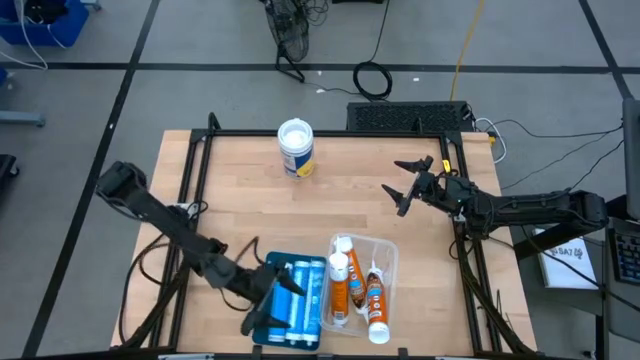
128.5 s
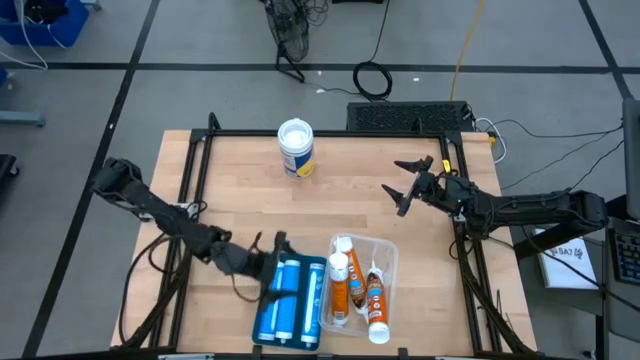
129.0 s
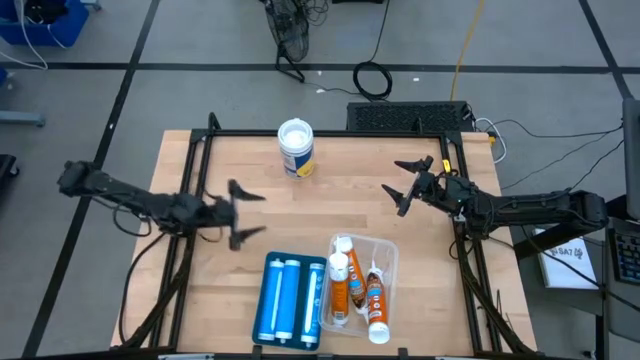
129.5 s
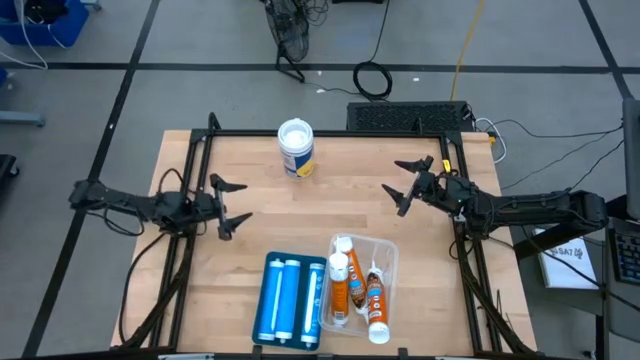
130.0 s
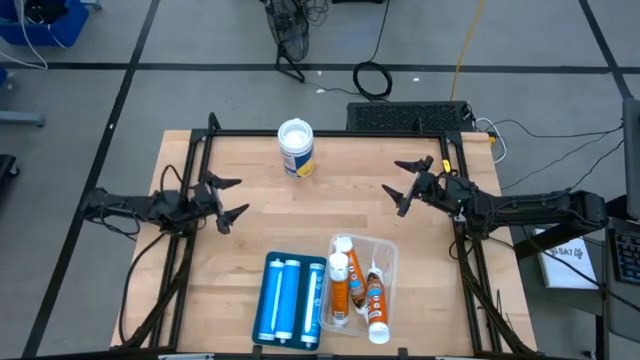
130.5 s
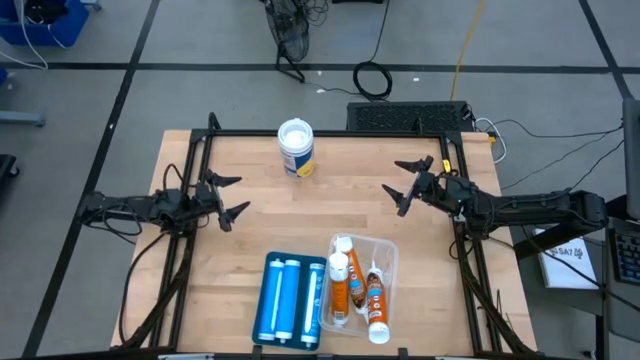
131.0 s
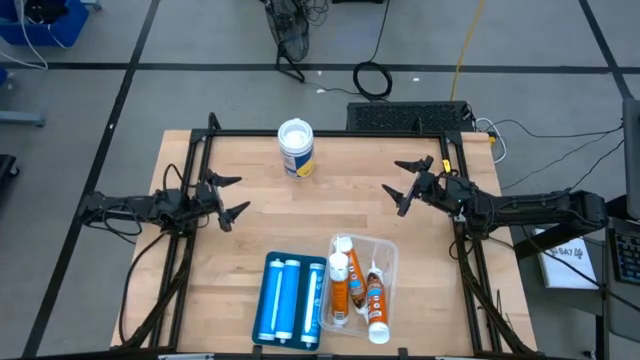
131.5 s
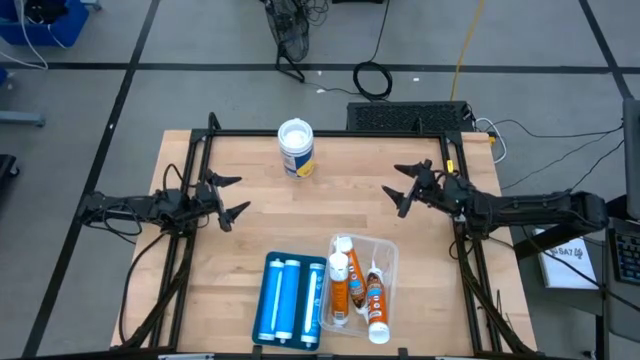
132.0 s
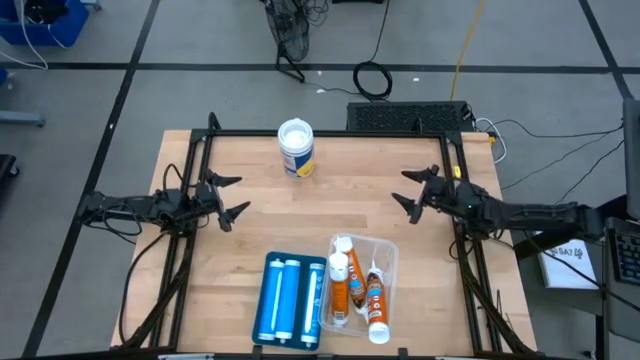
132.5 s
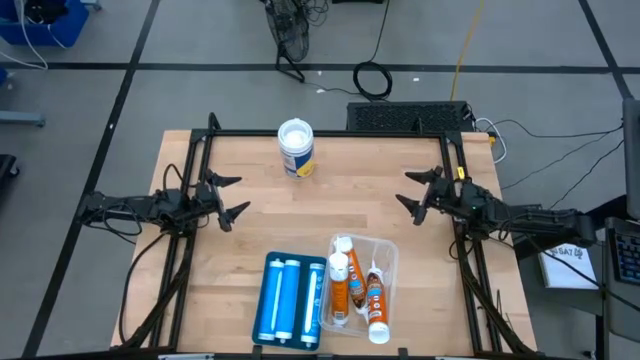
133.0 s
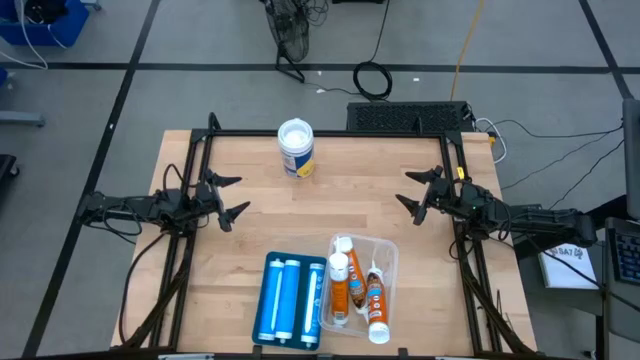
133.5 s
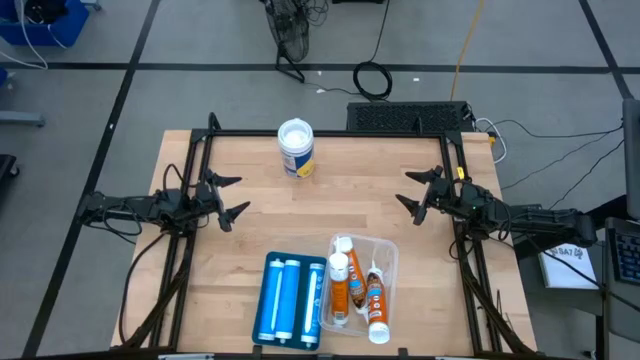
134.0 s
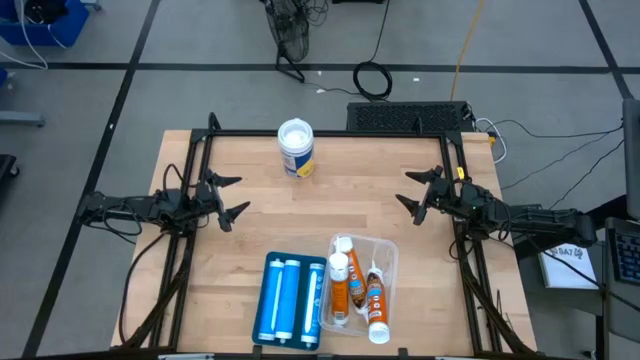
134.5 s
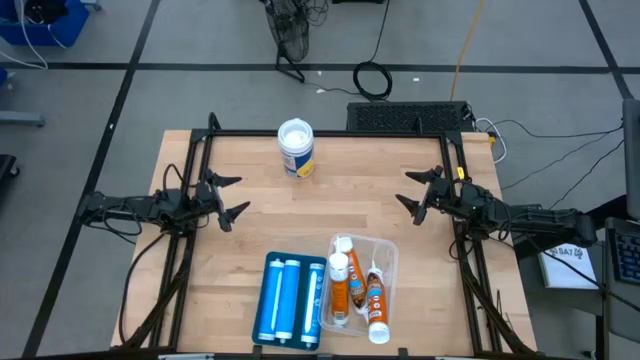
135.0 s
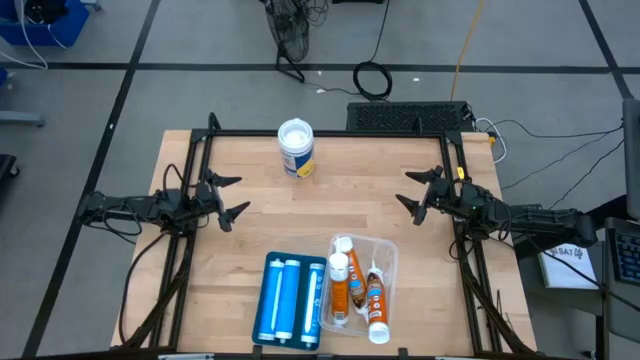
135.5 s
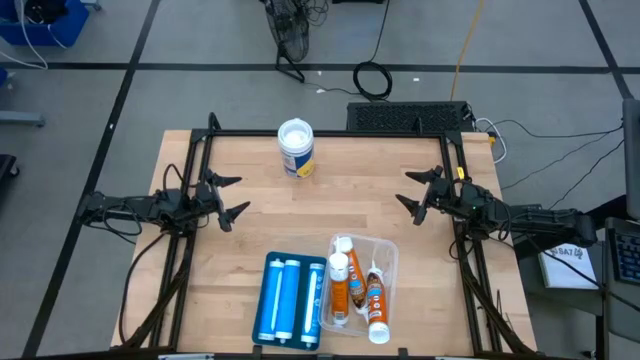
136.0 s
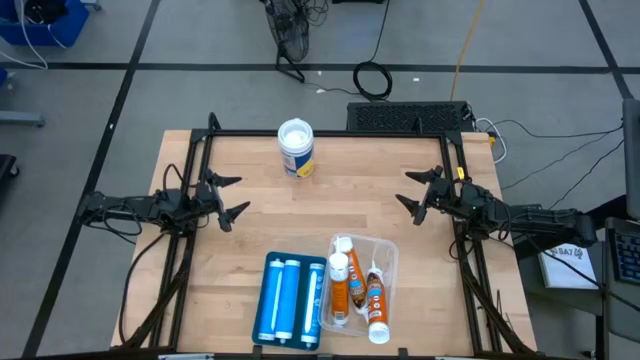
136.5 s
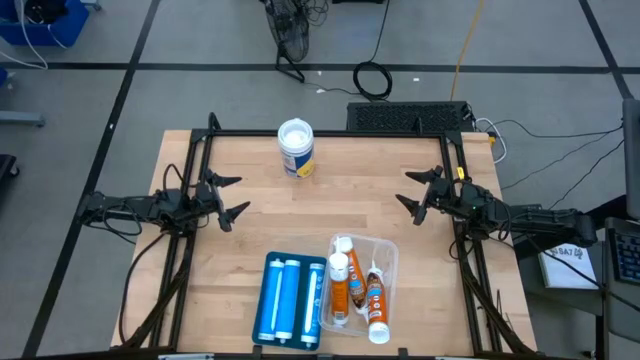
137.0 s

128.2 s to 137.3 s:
Task: Pick & place silicon tubes, Sealant and Lysol wipes
Return to Home Position

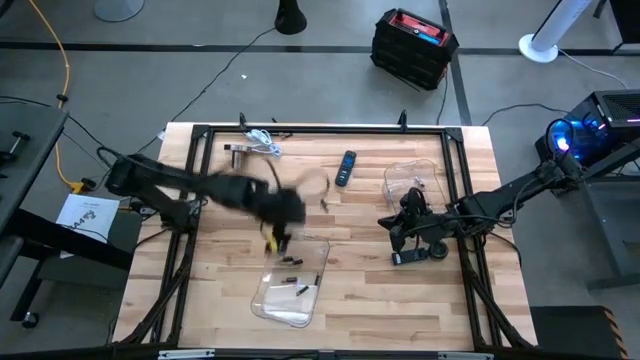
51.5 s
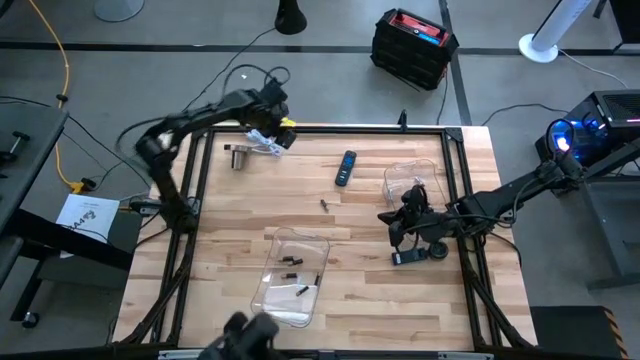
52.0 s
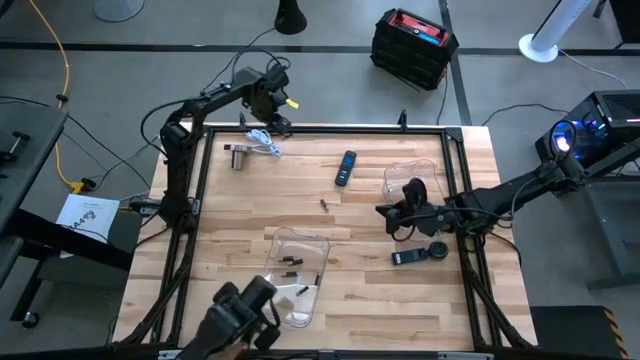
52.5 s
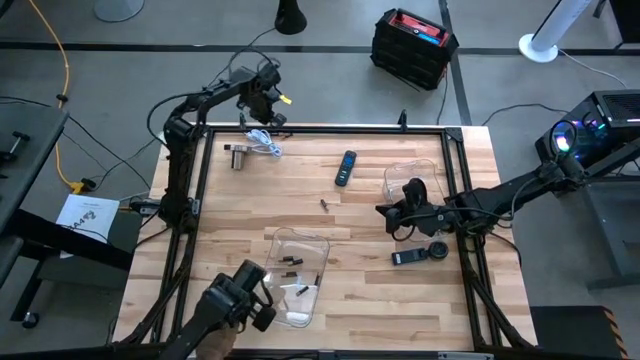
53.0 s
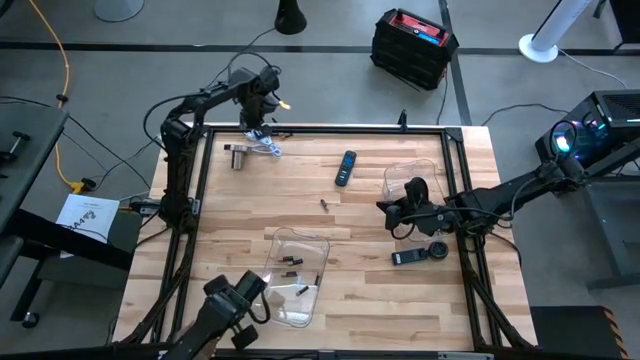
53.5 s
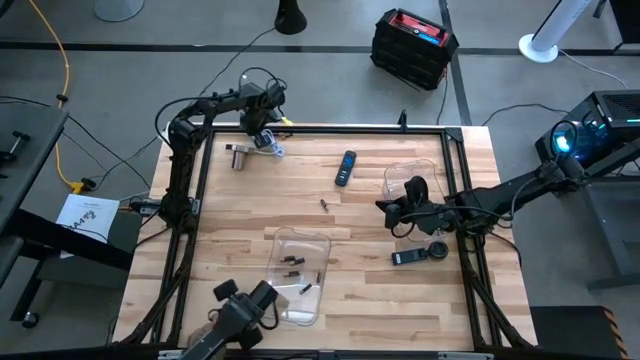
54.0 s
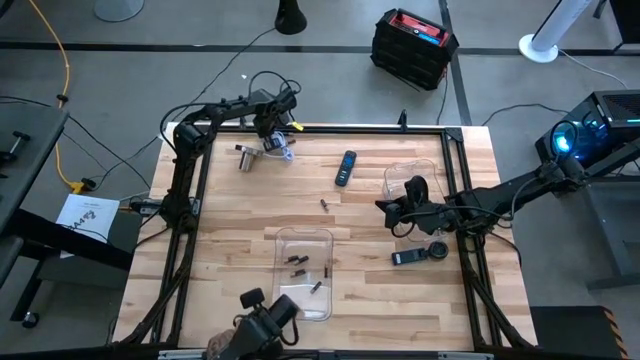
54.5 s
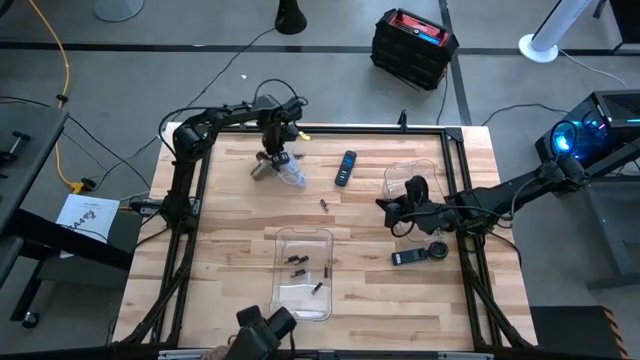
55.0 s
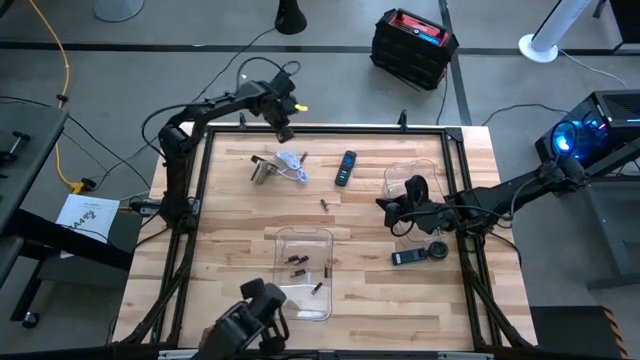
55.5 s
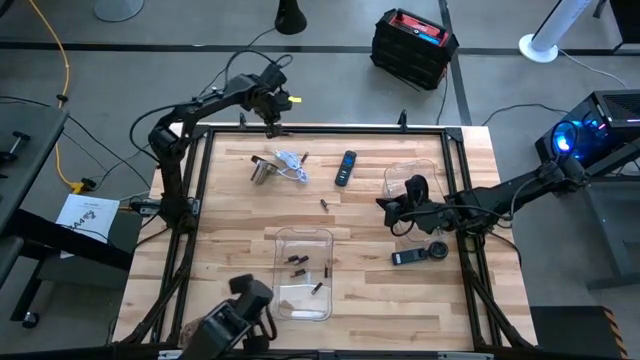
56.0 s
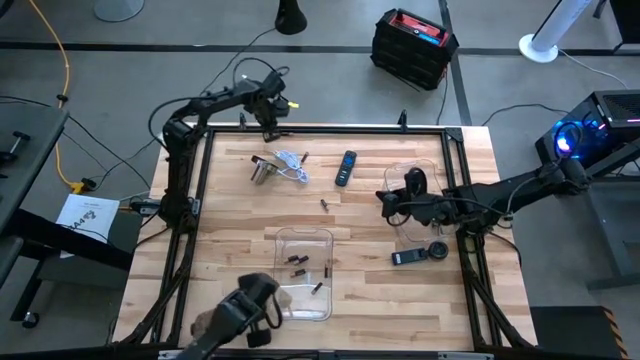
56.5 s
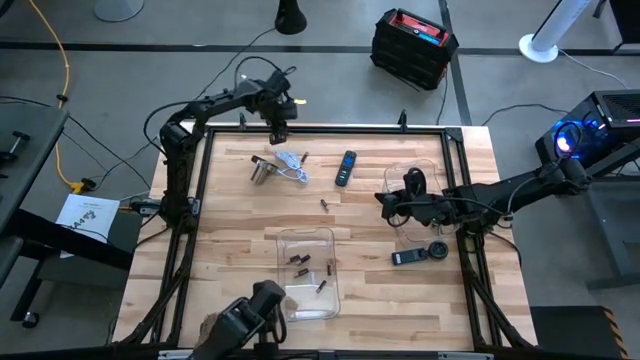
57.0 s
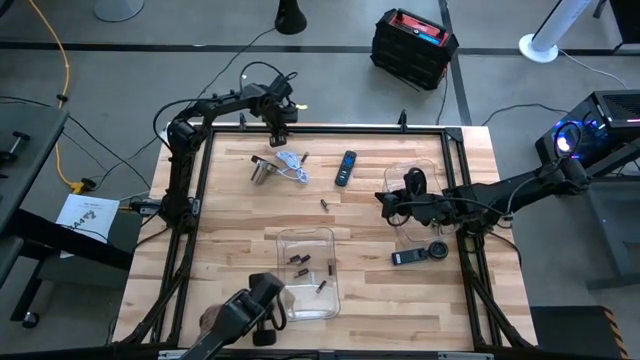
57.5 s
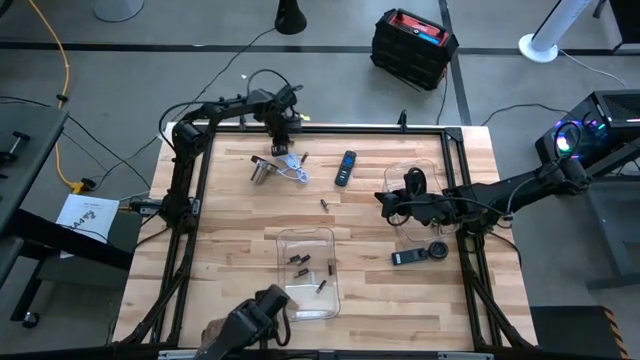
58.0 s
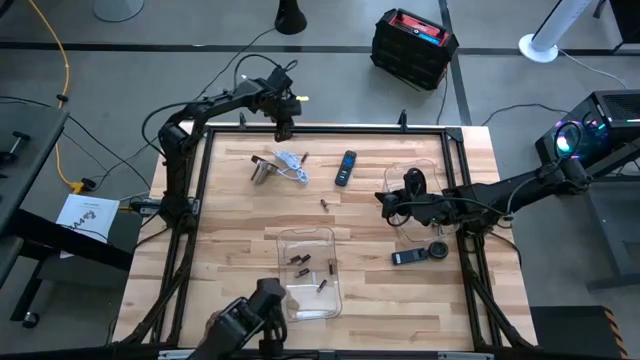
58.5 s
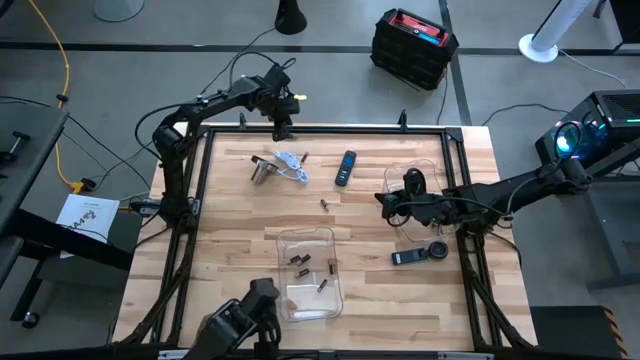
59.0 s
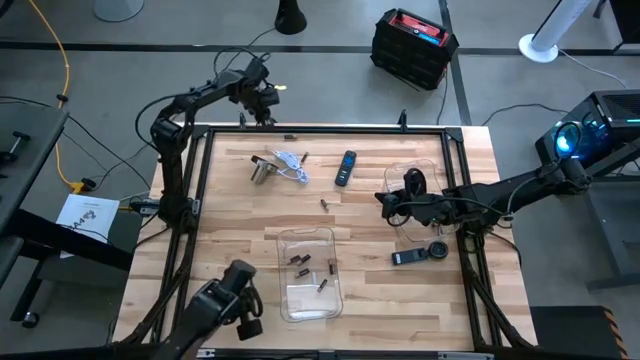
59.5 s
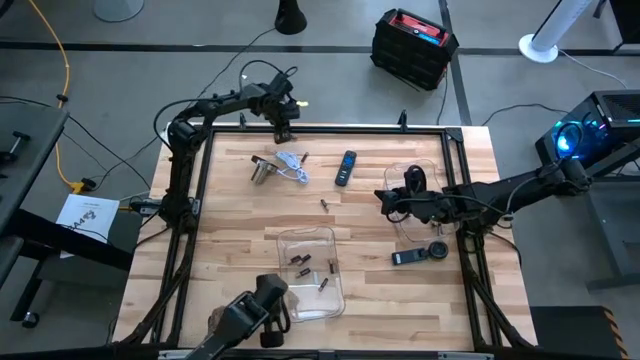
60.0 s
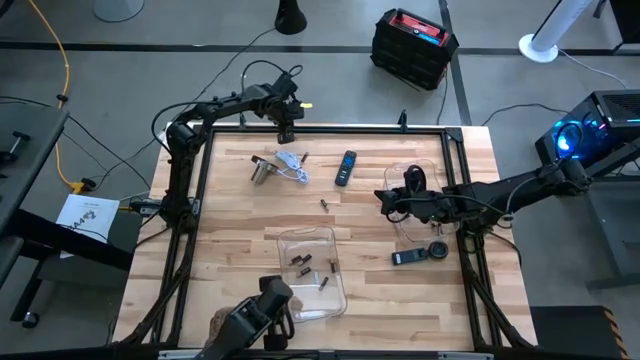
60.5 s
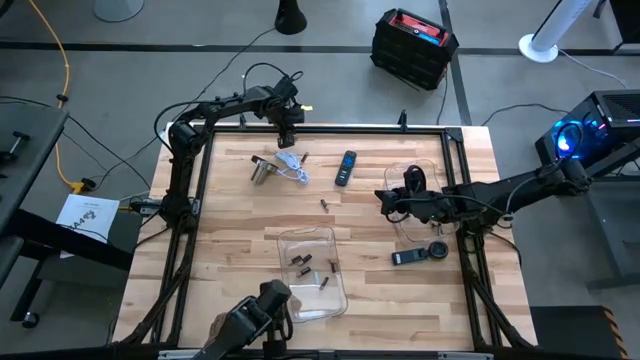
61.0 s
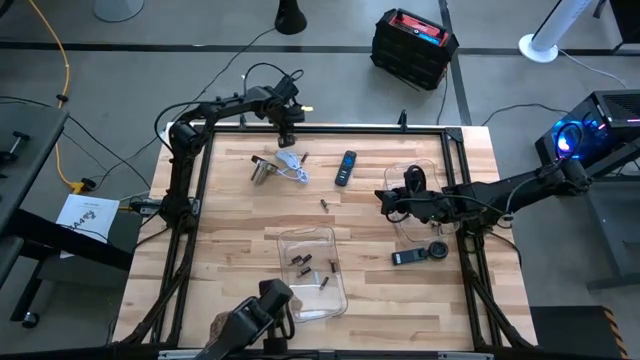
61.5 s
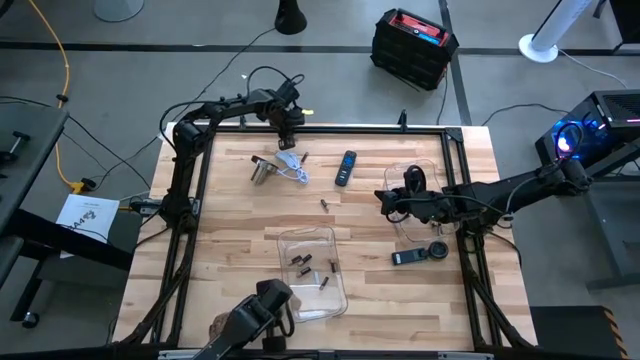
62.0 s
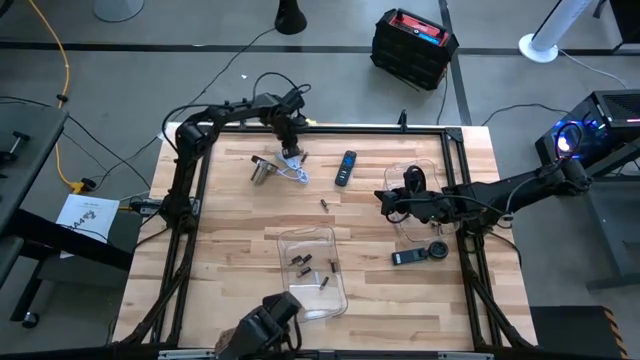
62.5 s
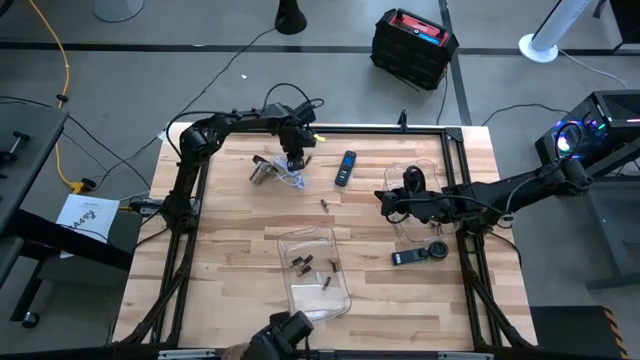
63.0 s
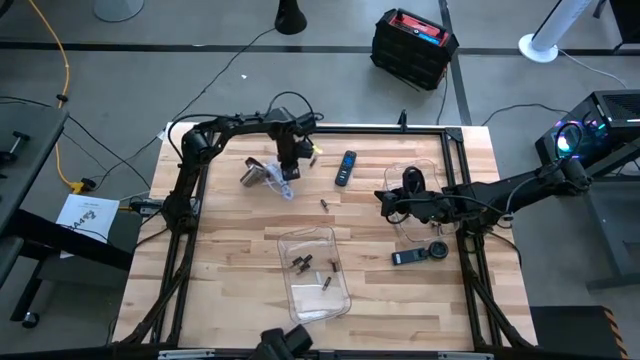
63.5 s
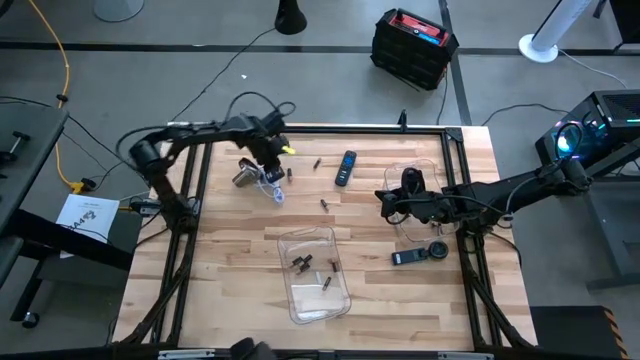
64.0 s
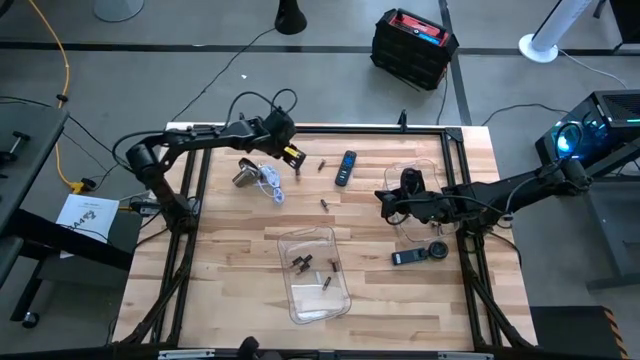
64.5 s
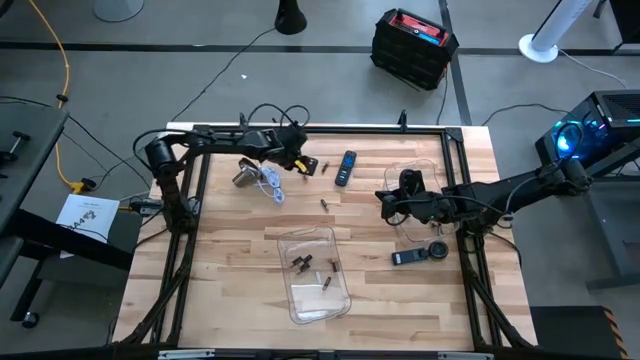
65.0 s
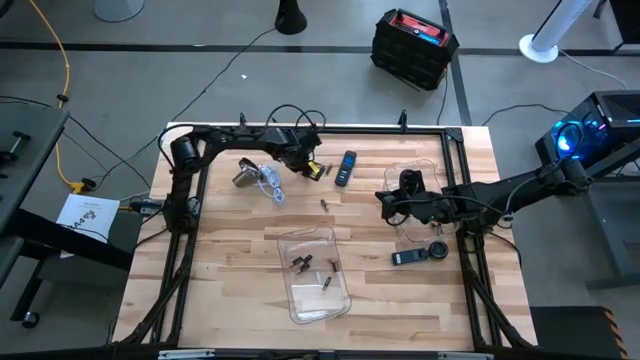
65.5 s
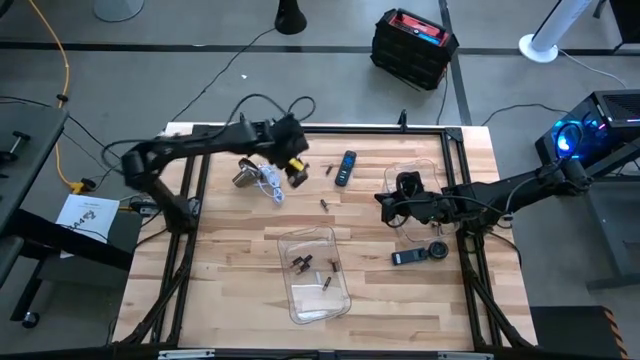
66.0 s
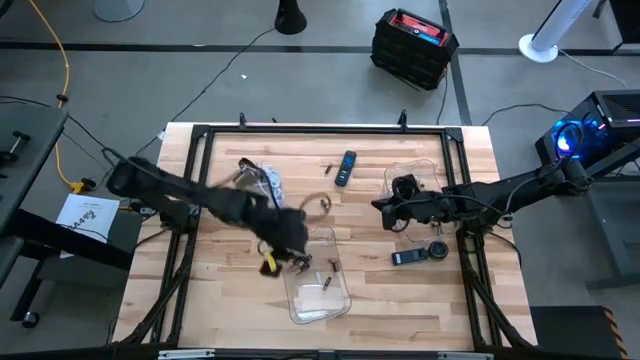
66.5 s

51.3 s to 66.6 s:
Task: Sort batteries
Put the black battery into the left transparent bin
